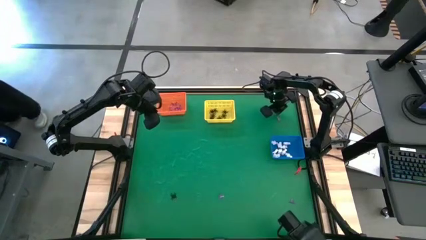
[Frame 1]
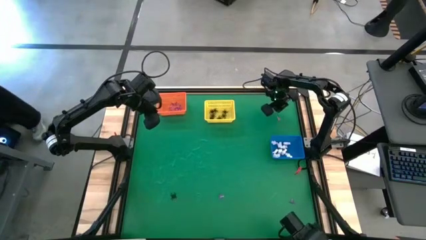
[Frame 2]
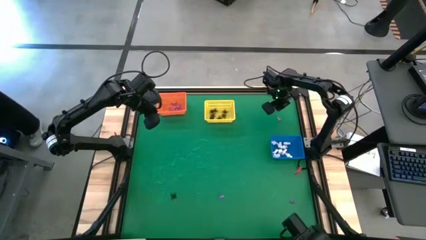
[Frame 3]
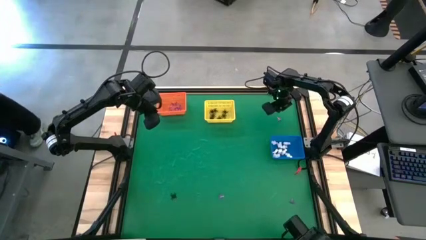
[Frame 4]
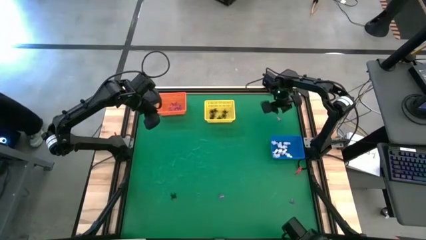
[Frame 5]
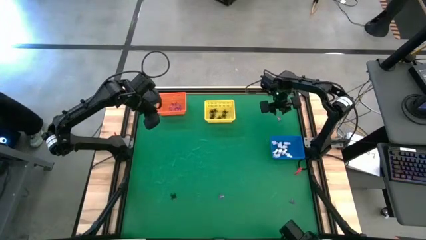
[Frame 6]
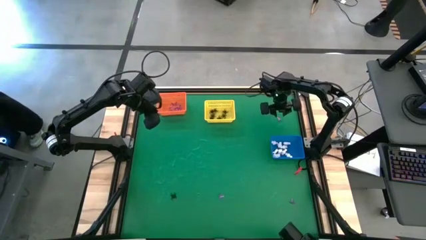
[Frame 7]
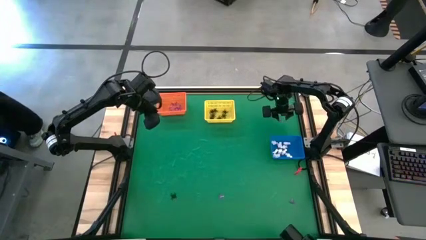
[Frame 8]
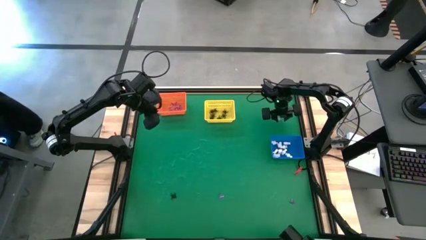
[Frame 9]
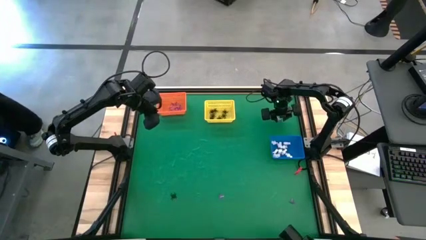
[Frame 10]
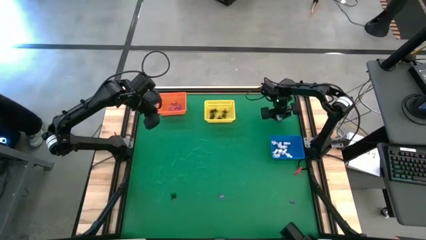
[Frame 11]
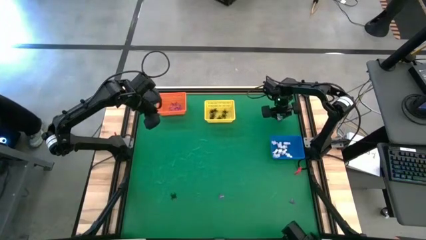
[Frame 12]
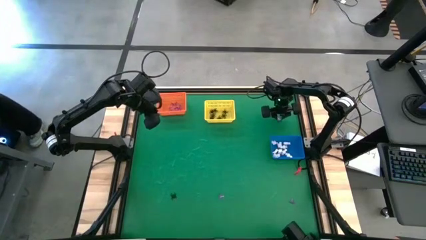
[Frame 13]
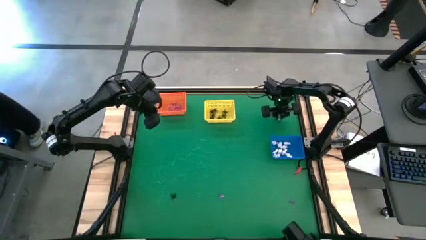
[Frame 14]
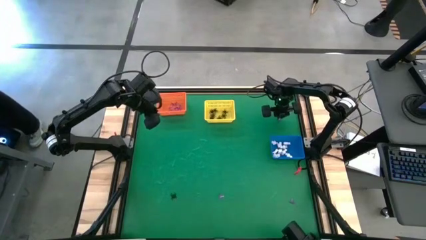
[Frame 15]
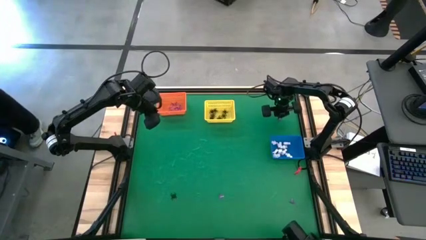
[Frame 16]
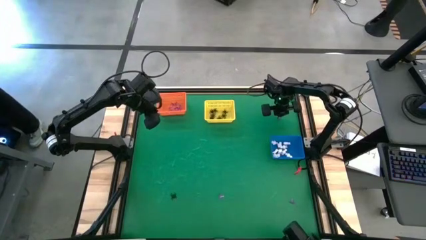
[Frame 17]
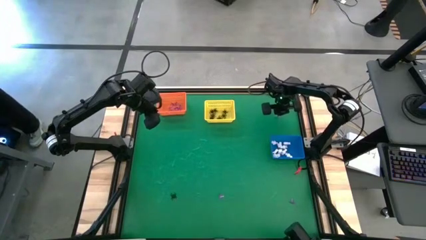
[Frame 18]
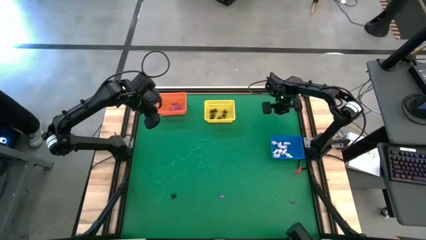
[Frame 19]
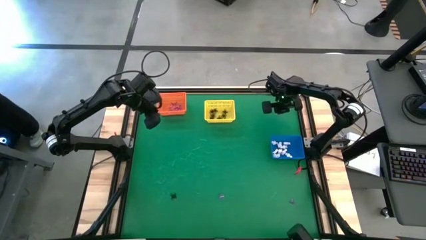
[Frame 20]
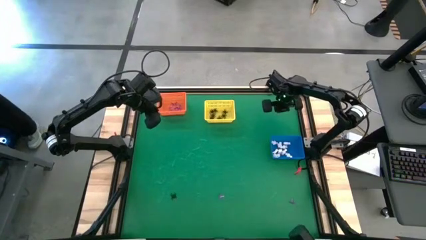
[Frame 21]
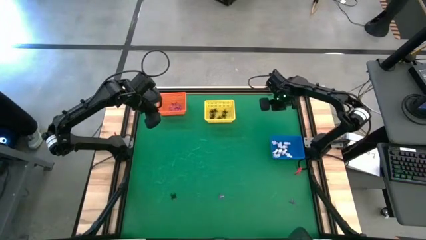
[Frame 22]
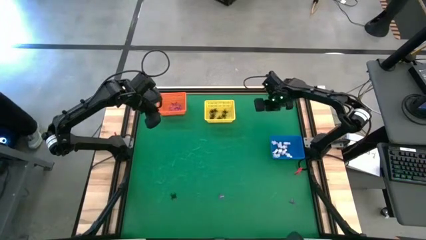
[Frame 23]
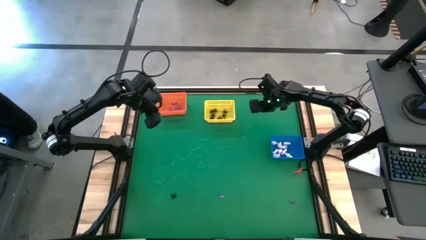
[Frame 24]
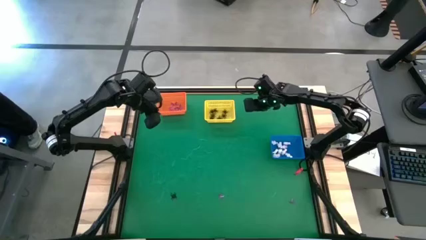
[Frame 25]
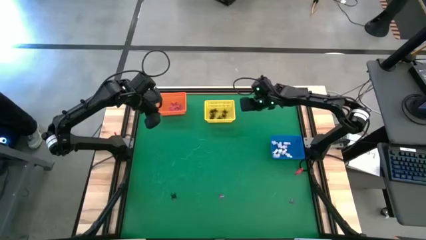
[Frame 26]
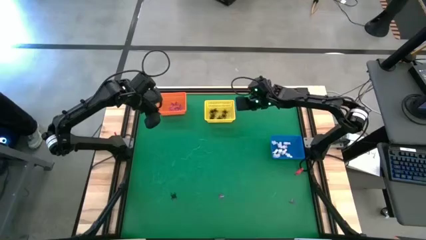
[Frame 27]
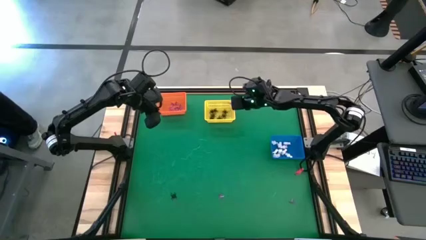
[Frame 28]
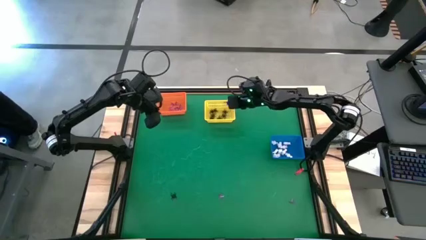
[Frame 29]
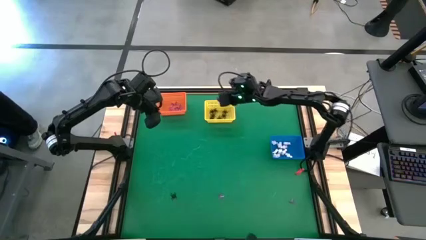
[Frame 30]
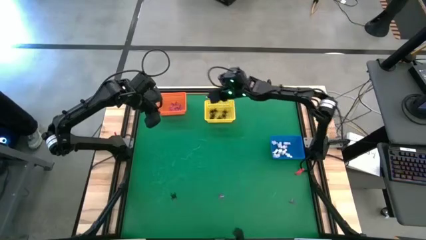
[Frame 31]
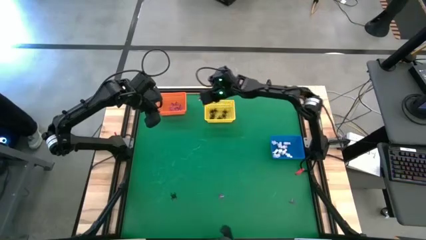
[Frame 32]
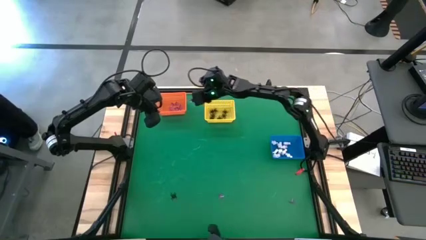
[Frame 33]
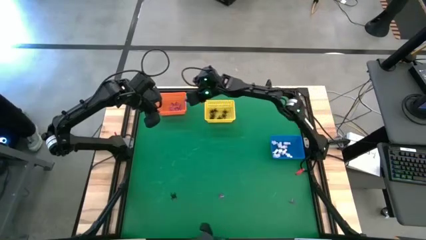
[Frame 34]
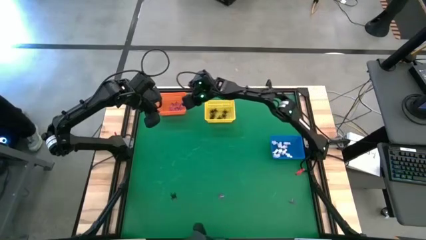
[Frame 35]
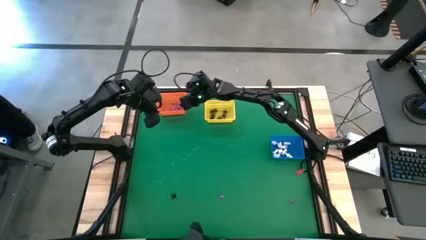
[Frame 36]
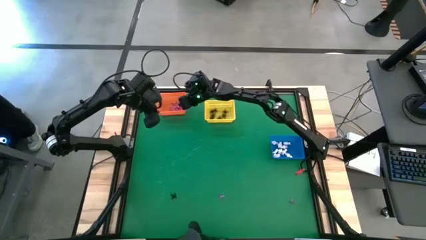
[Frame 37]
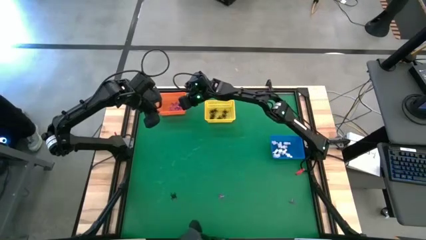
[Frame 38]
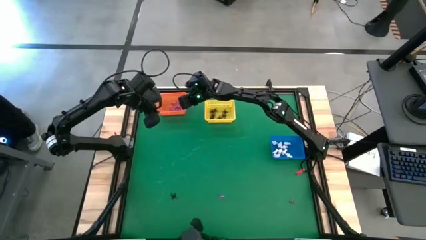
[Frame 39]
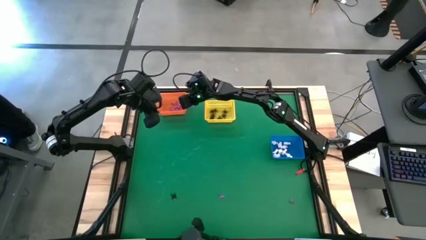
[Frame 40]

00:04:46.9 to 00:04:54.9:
Task: Sort Halloween decoration
Put the violet hat toy into the orange basket

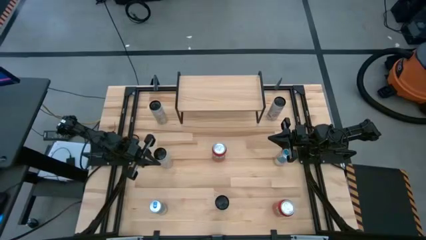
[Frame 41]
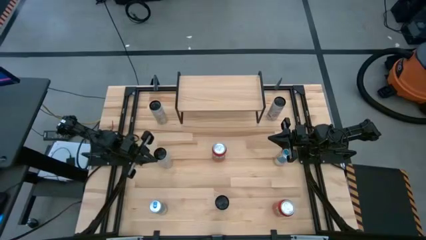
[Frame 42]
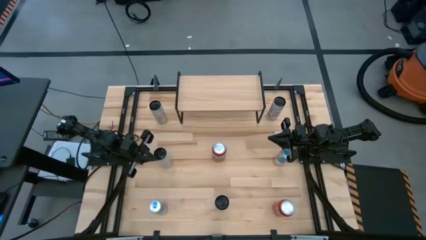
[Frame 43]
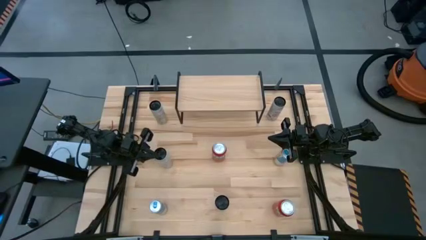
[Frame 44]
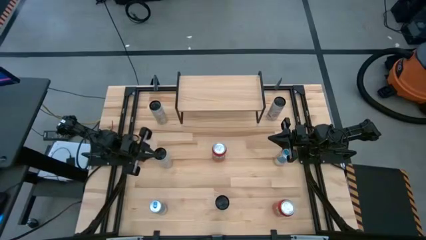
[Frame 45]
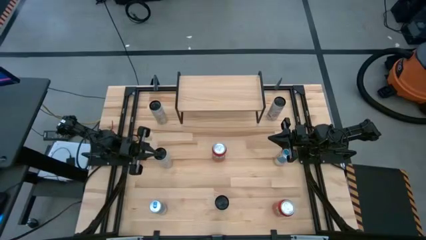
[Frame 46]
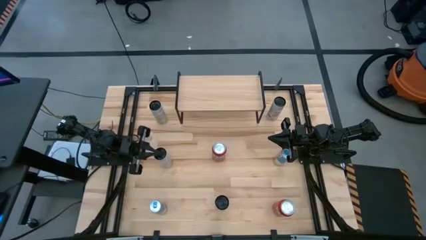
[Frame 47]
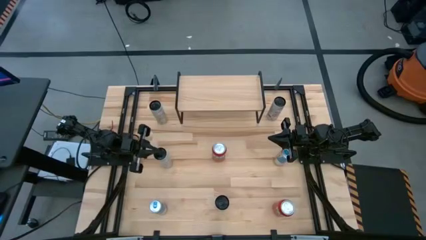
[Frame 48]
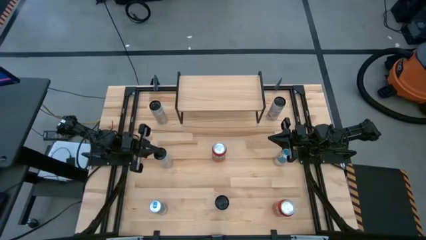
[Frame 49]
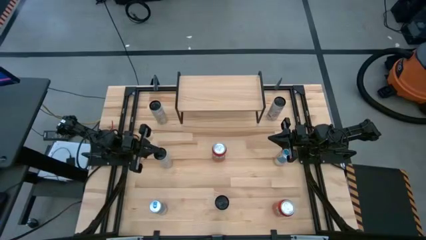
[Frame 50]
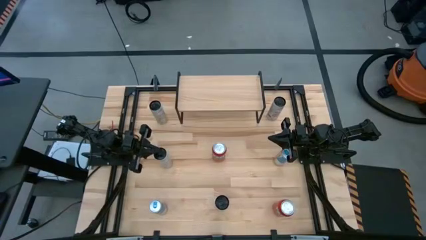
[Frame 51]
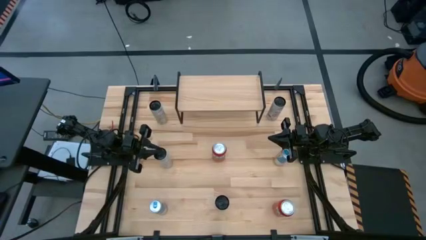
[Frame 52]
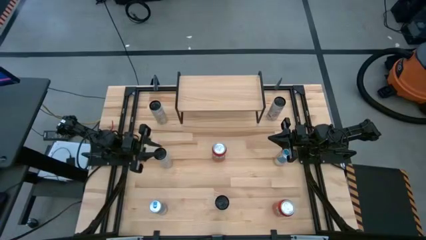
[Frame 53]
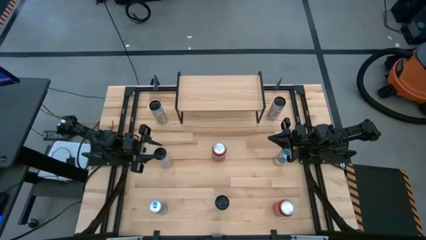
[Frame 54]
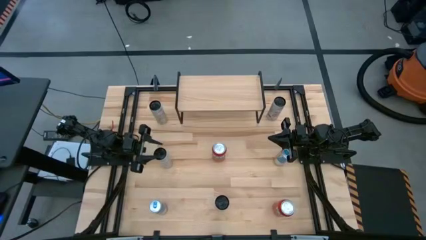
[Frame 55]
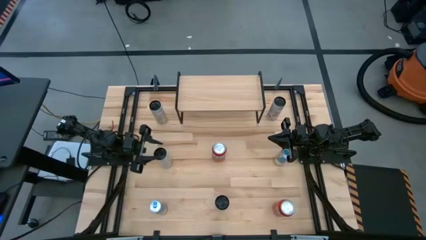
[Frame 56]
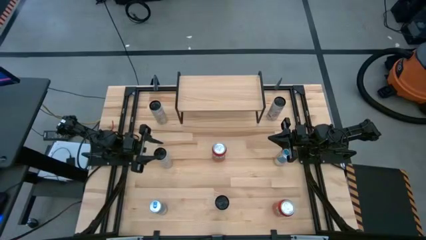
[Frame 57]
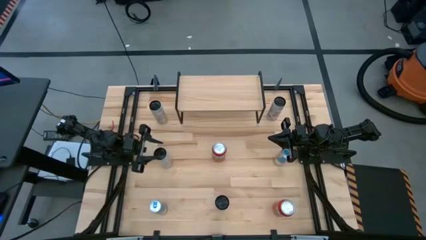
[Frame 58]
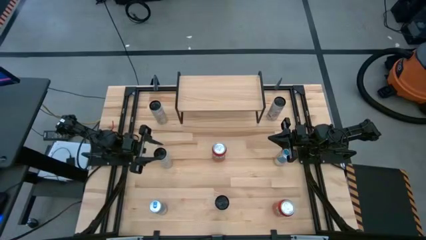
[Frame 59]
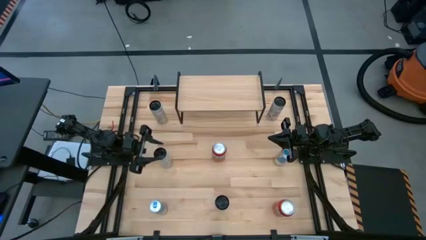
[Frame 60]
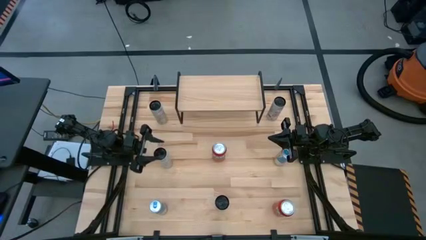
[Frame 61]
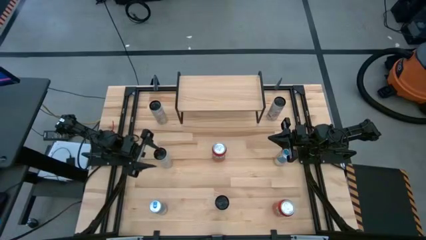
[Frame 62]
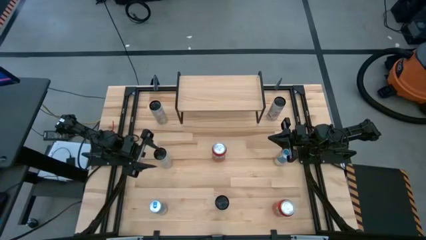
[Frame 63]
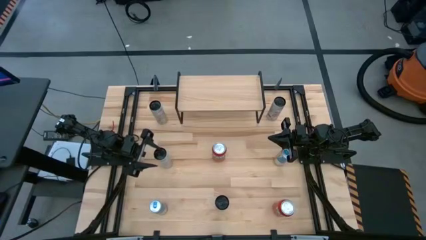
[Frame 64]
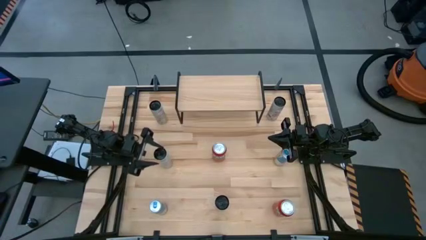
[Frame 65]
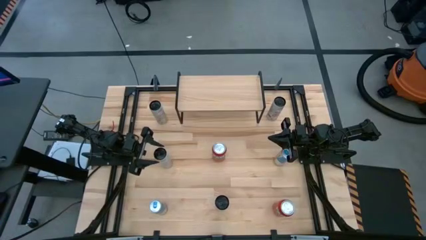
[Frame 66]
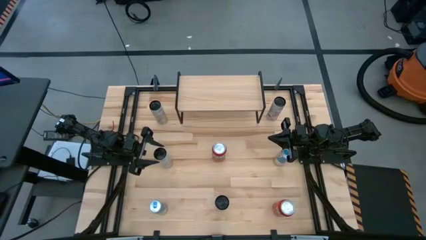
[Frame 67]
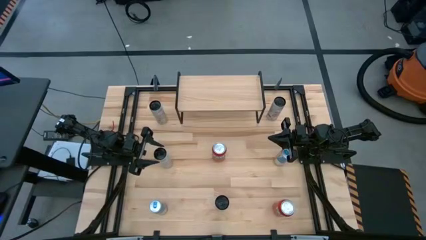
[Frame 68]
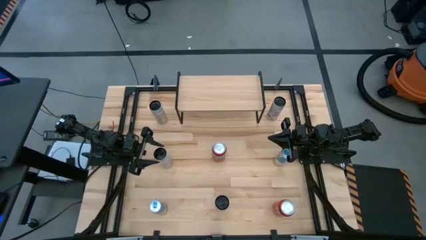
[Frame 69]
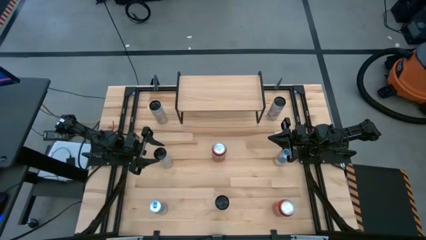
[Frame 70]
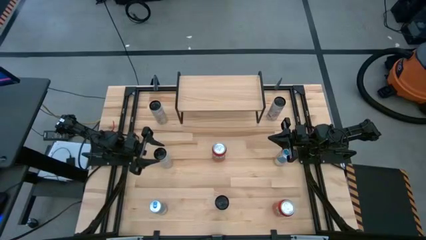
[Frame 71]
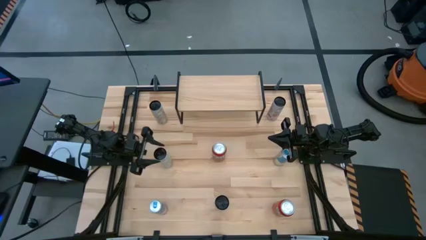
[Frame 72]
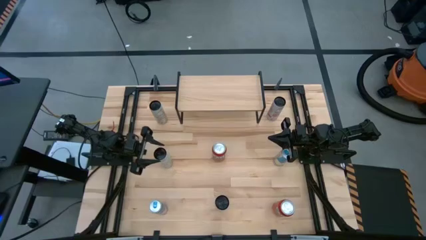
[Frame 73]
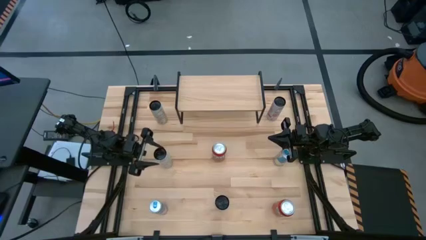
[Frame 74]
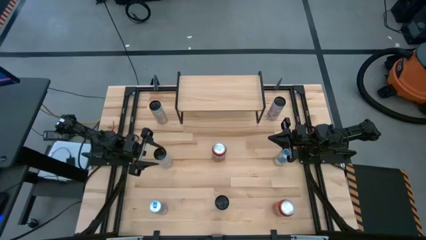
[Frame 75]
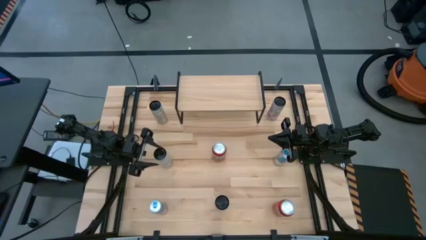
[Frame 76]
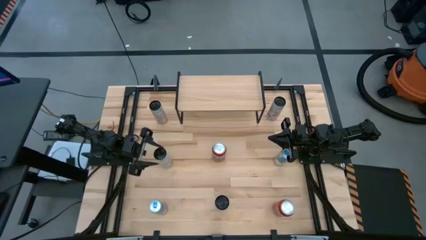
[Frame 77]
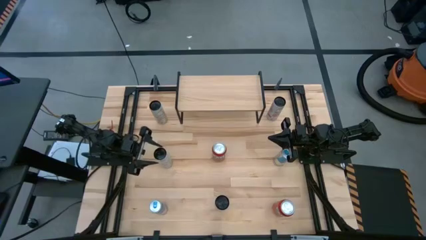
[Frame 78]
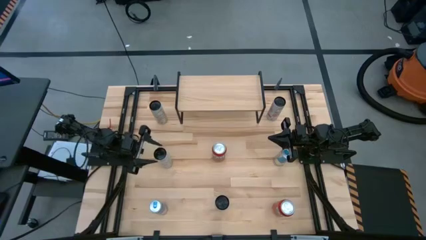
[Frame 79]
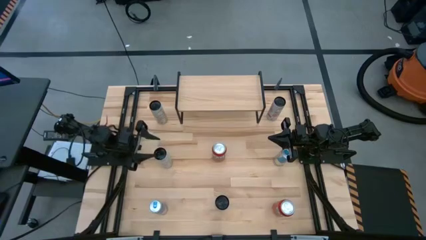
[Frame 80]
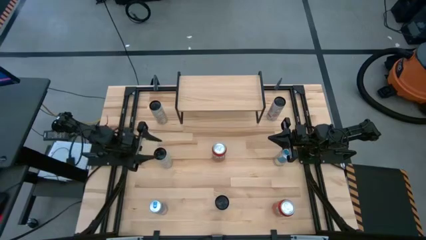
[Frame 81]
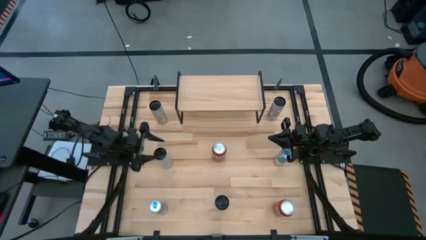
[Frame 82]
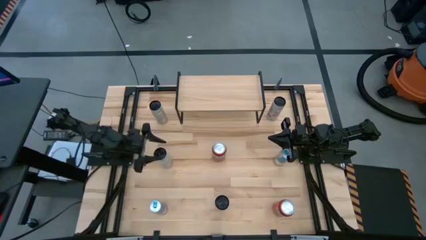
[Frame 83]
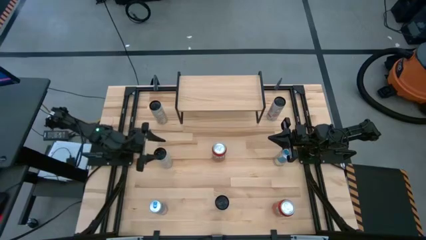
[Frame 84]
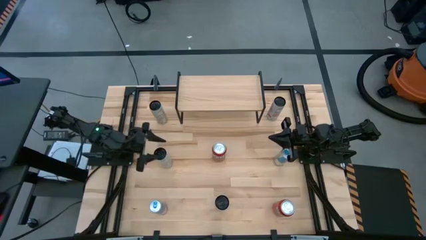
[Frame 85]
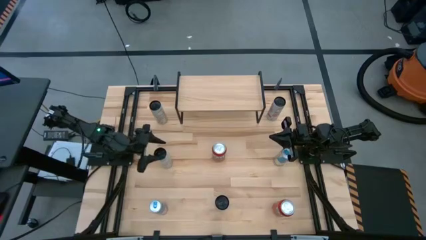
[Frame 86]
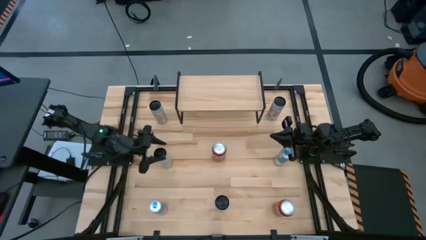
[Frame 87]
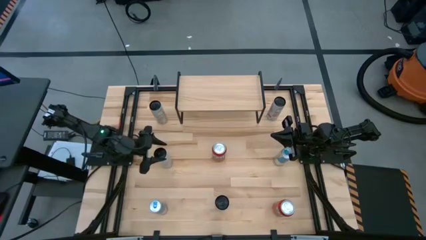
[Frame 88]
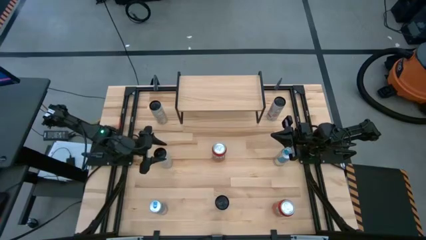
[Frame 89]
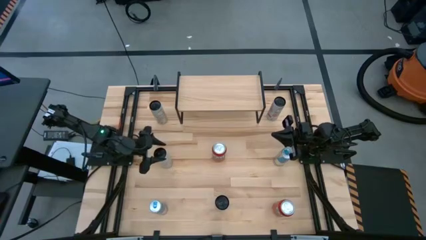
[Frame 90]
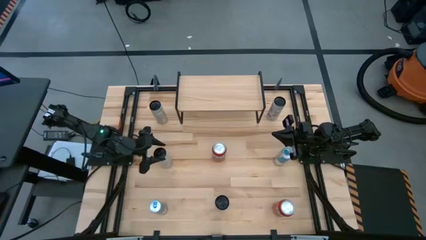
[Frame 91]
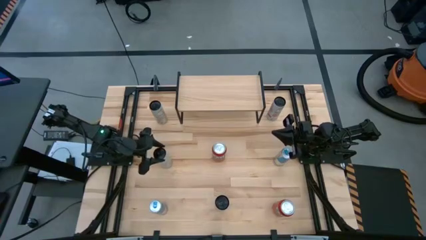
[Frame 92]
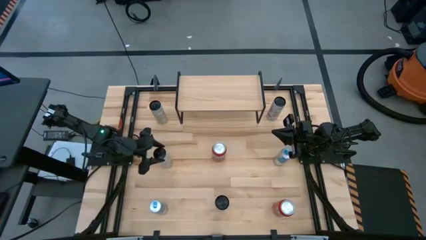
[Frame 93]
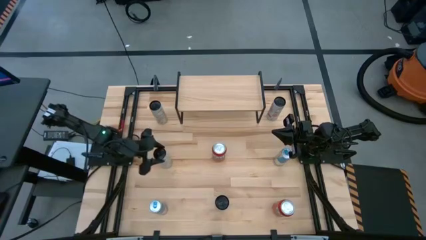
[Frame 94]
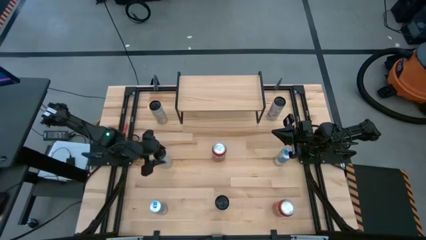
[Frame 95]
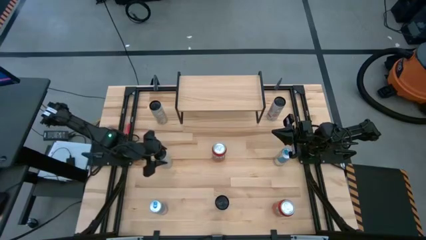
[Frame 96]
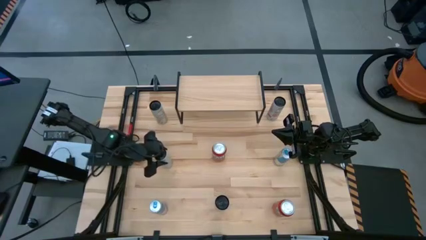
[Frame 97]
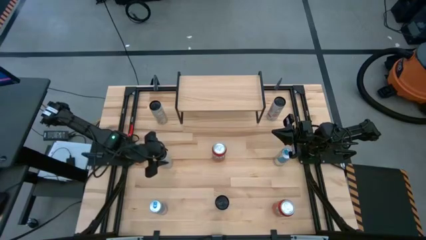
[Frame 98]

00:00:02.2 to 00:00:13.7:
Task: Place canned beverage on shelf
Put the bottom white yellow soda can on the shelf
